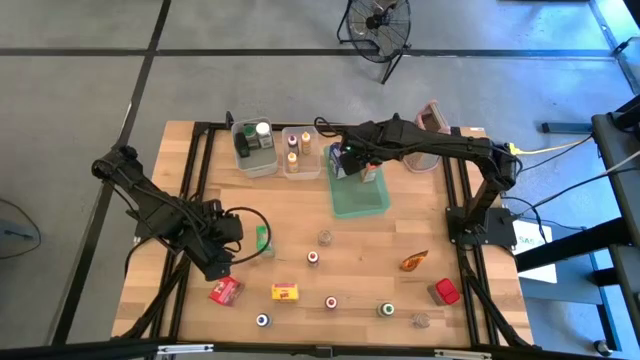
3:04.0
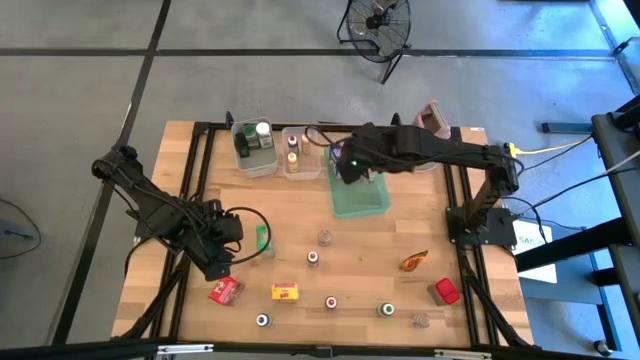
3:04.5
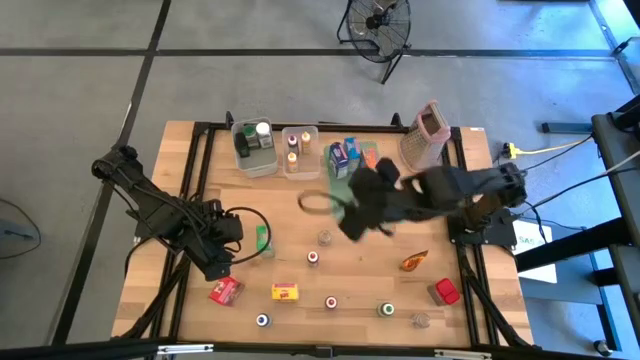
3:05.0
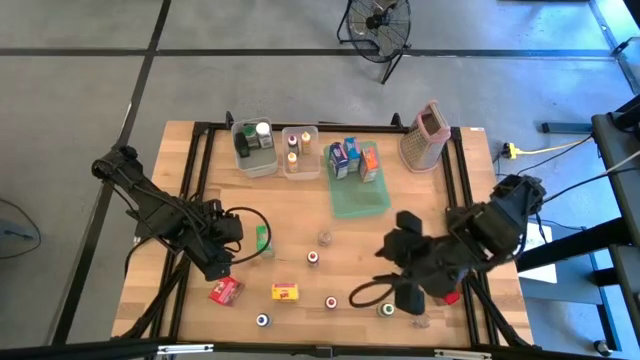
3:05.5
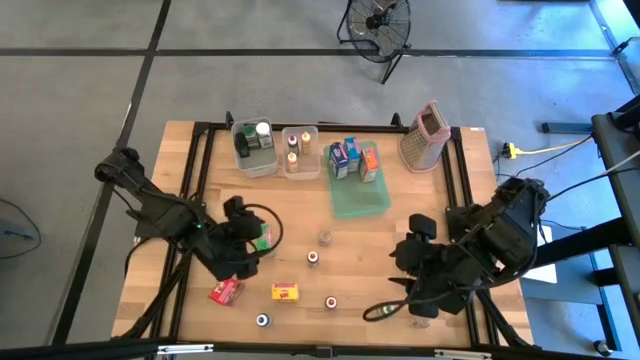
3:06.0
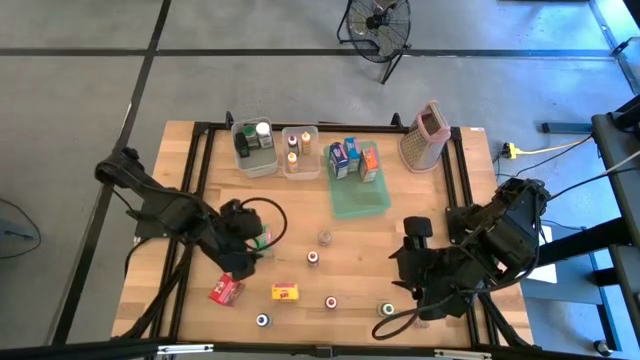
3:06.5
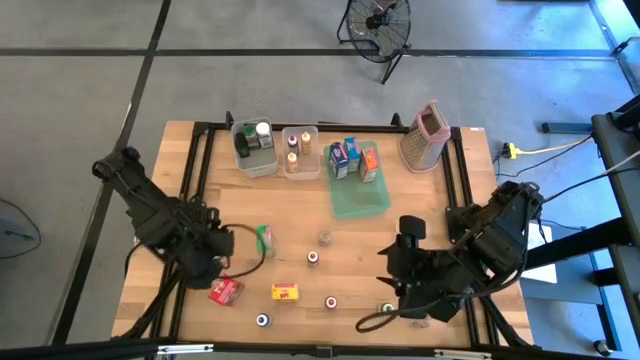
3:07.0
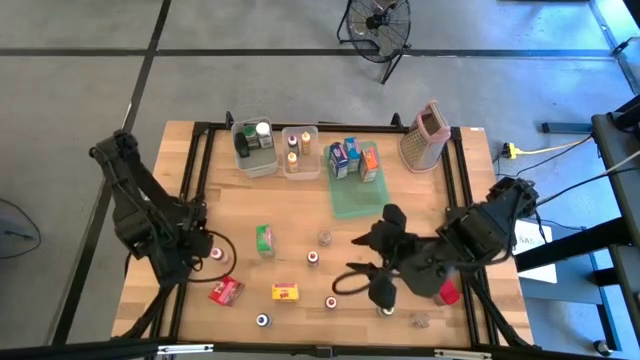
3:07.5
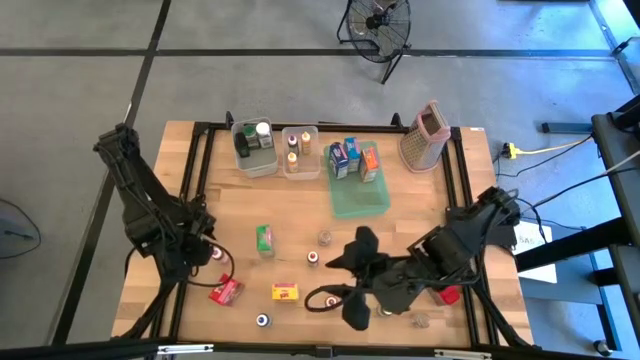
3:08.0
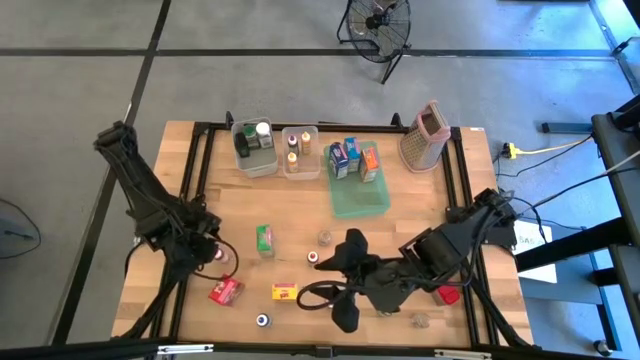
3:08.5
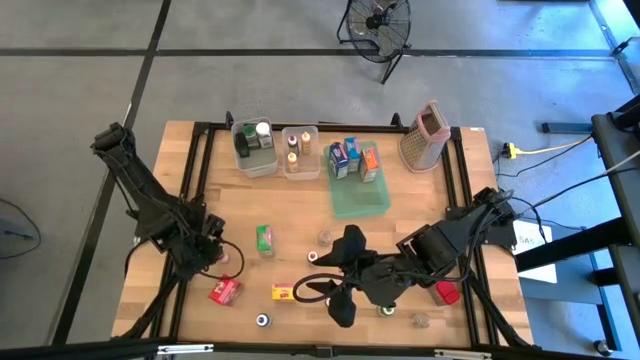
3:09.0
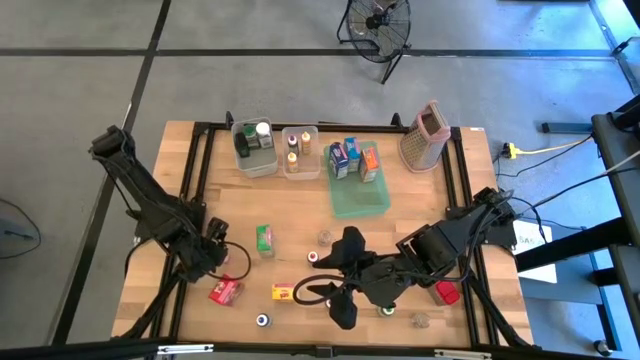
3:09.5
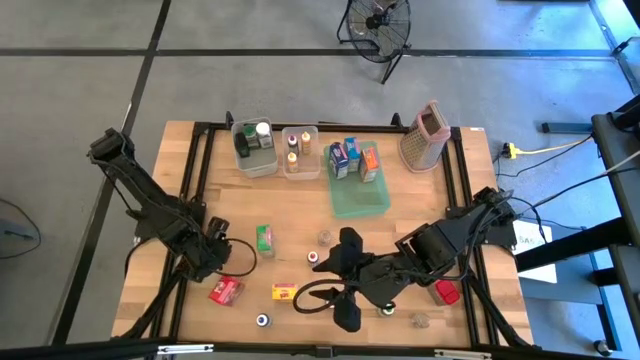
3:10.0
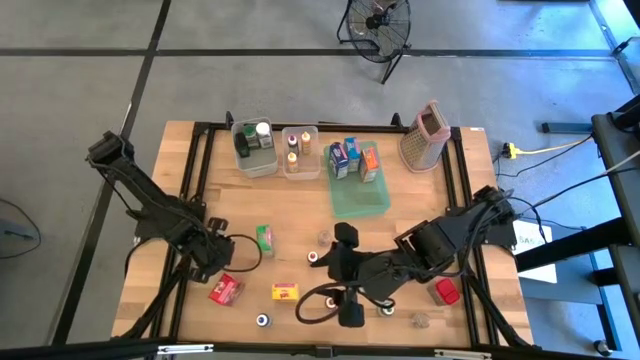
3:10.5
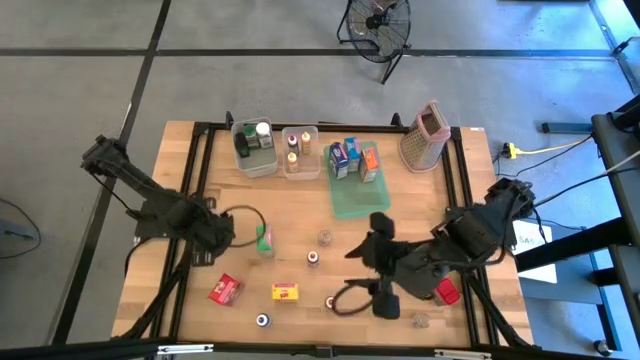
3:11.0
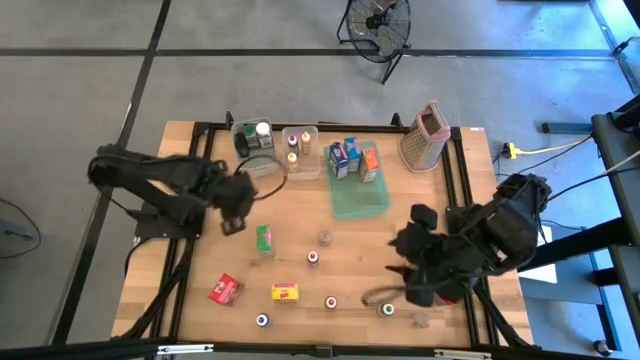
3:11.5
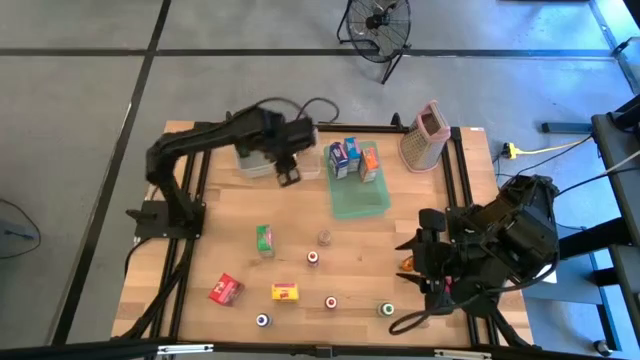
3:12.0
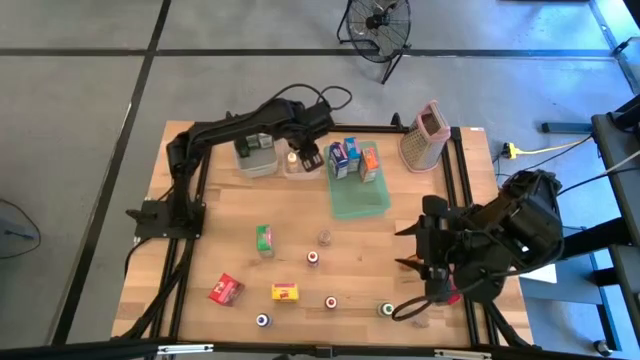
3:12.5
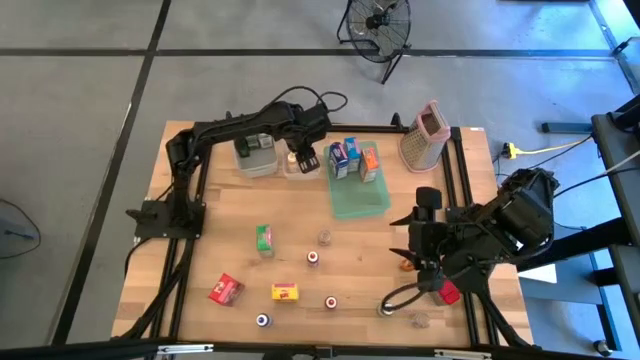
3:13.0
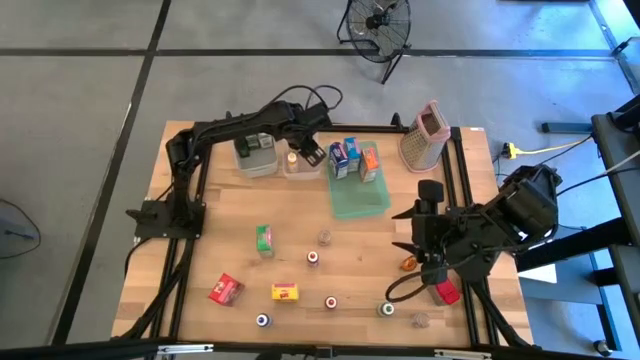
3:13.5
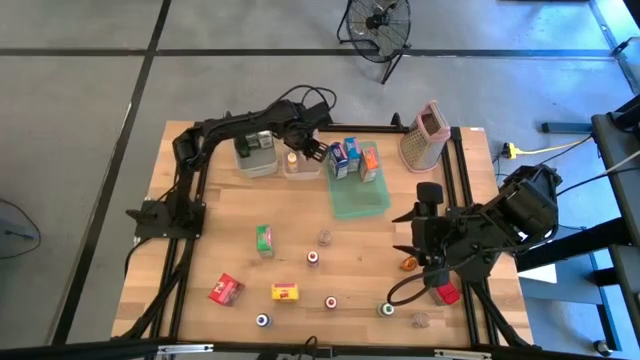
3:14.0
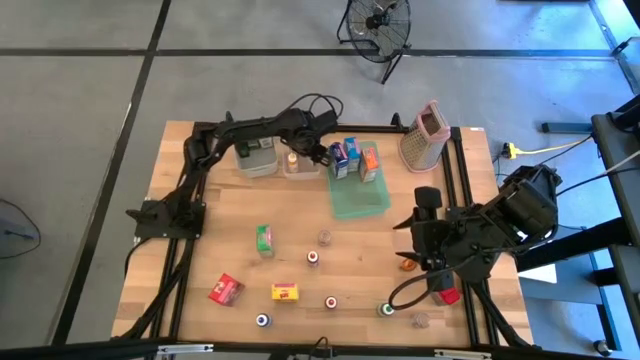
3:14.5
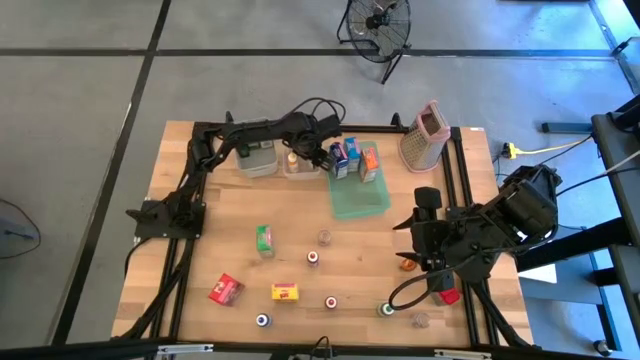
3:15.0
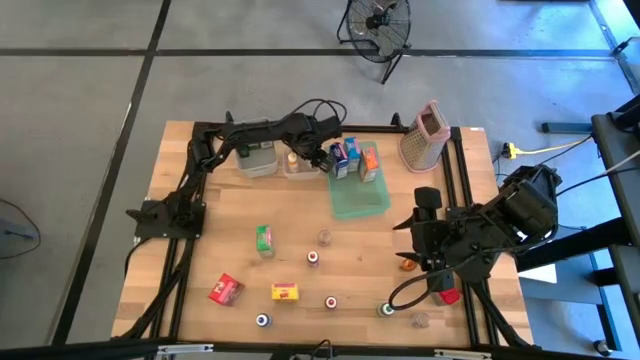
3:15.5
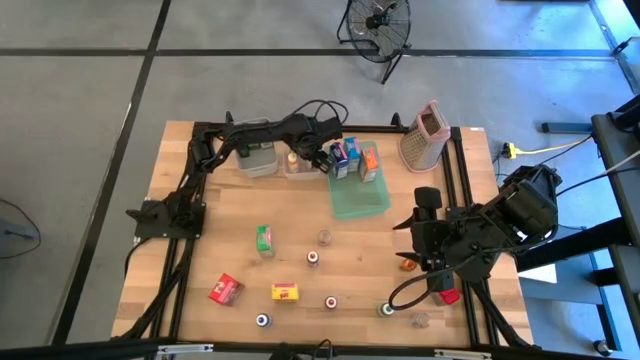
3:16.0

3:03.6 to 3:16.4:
Task: Pick & Place Kitchen Items
Put the pink food coloring bottle into the transparent bin

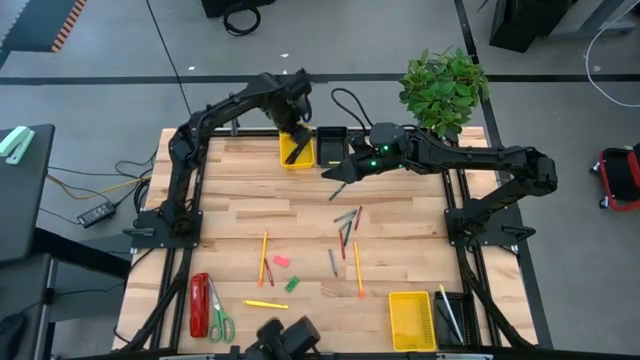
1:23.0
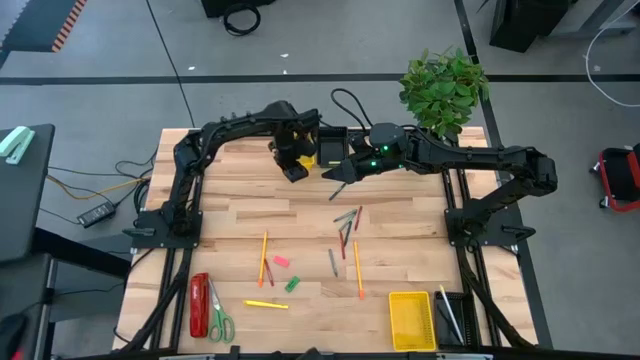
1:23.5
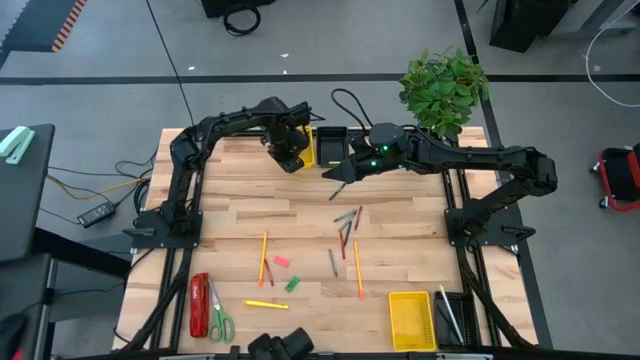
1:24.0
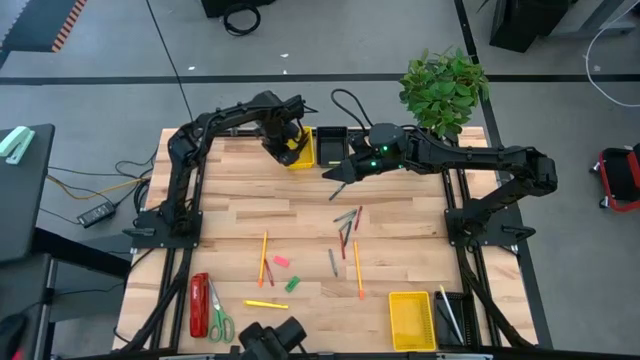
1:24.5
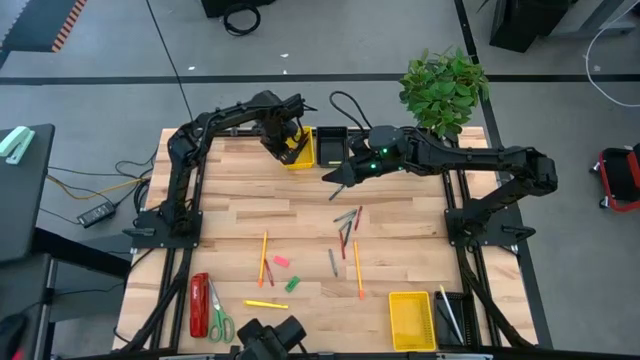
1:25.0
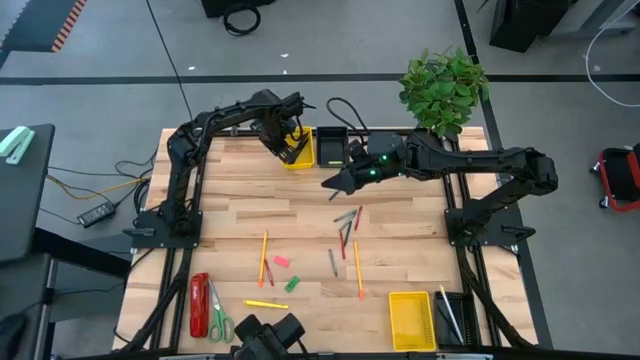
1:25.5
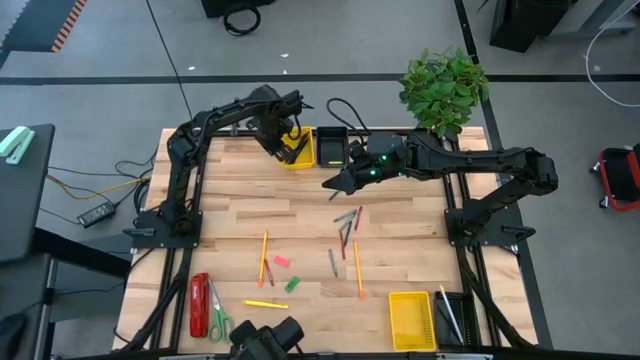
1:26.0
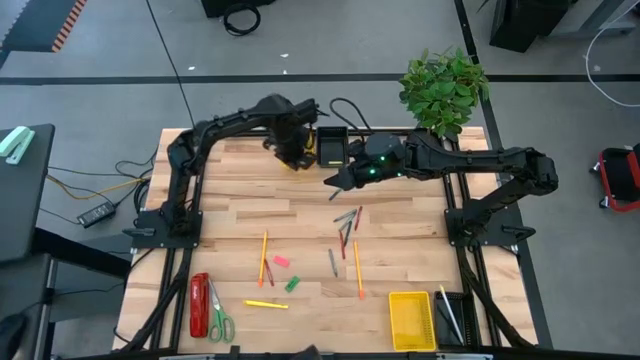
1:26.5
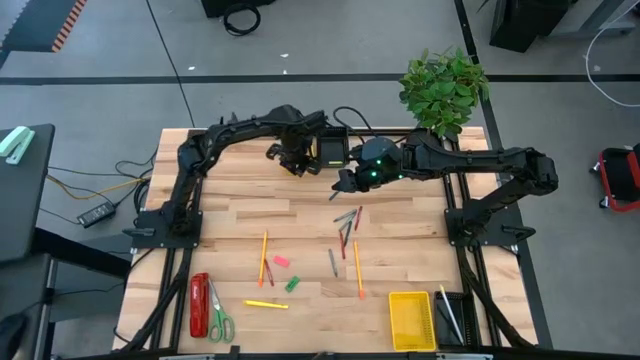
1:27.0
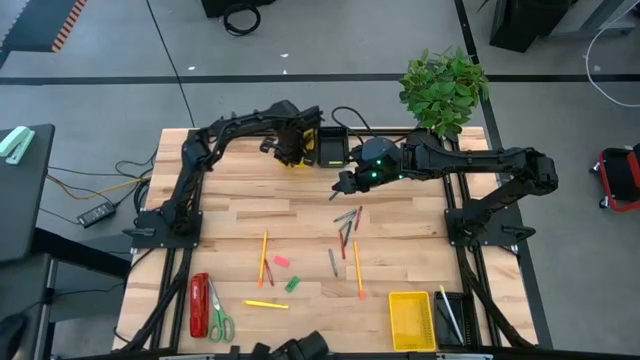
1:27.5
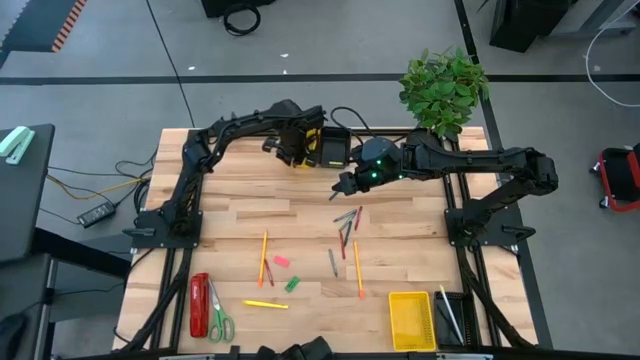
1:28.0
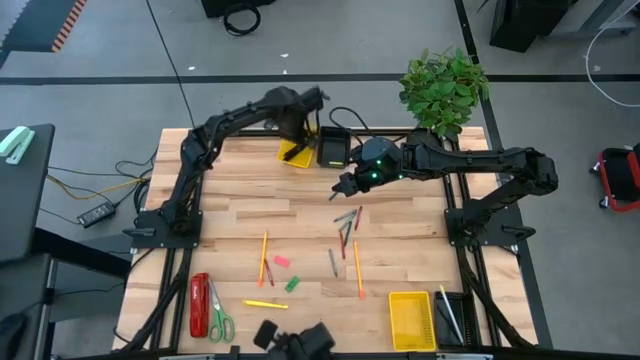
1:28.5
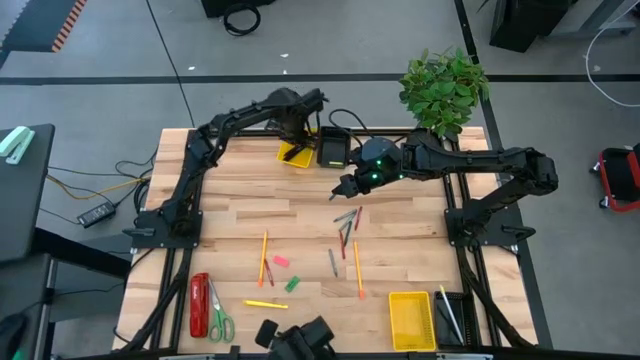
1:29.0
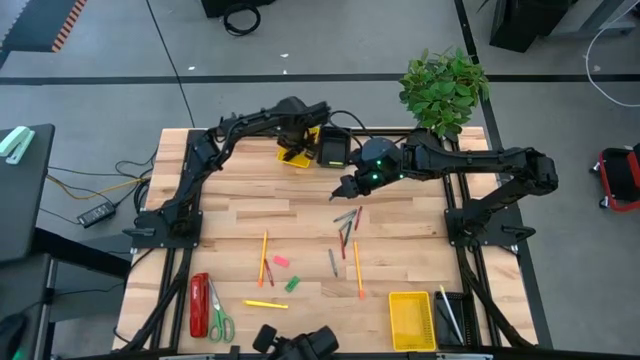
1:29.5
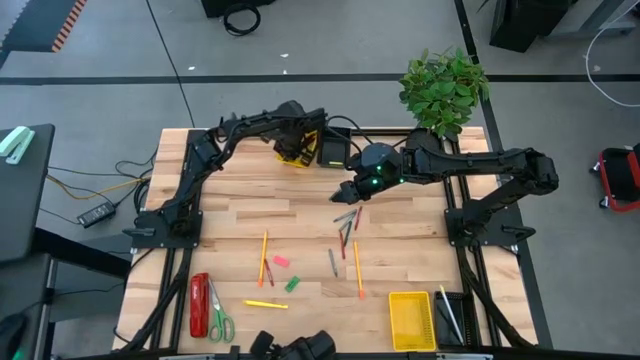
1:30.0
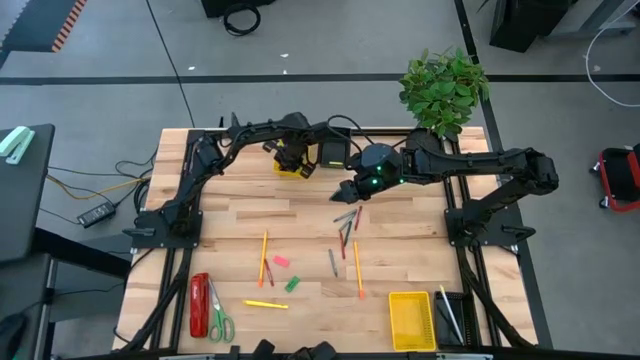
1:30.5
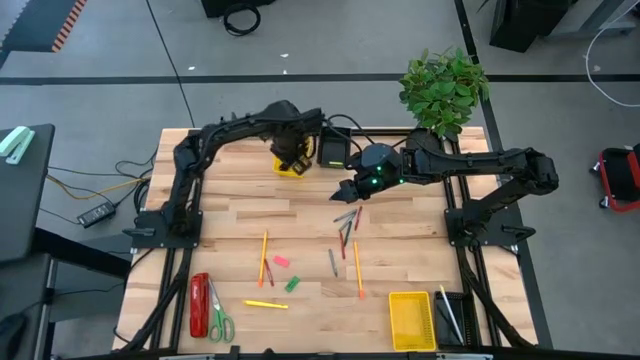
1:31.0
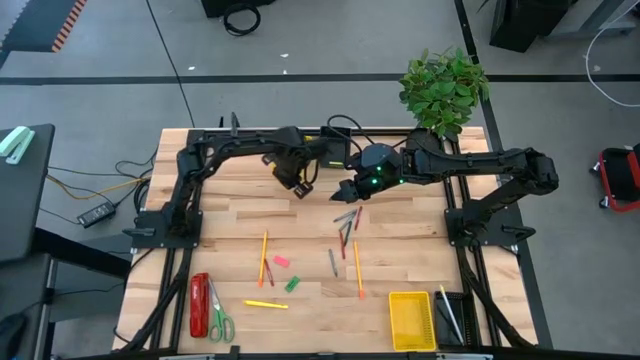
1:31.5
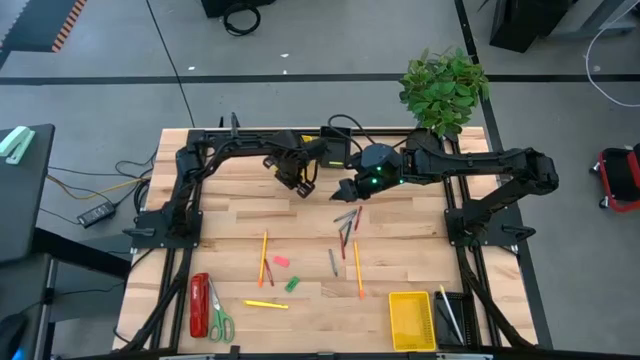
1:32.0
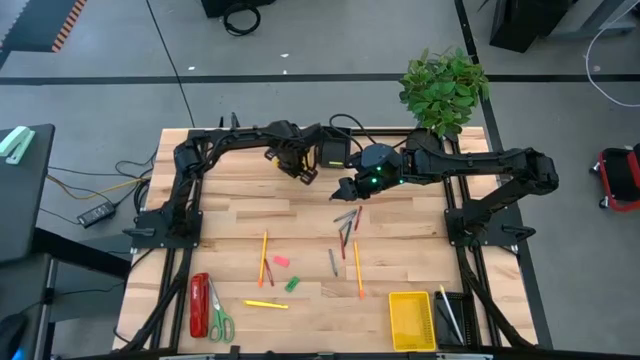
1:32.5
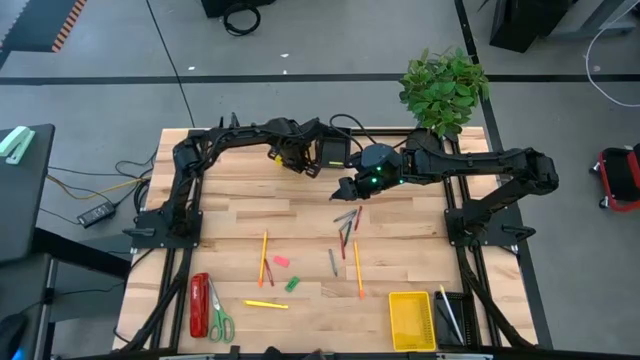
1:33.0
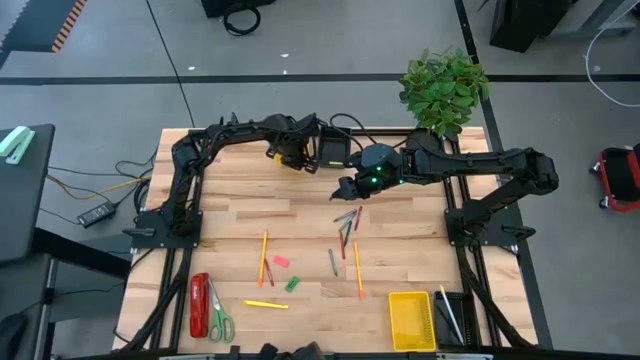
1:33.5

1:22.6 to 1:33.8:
Task: Sort crayons/erasers/pens/pencils in bins
Adjust the top yellow bin
